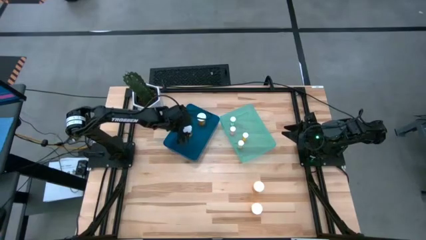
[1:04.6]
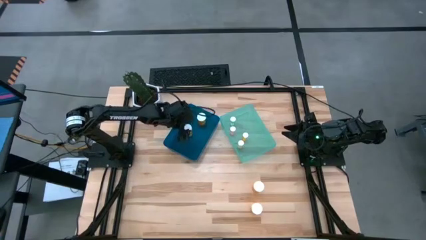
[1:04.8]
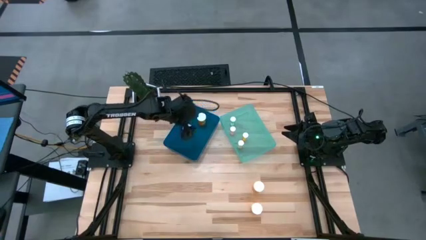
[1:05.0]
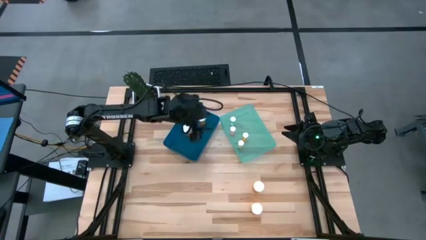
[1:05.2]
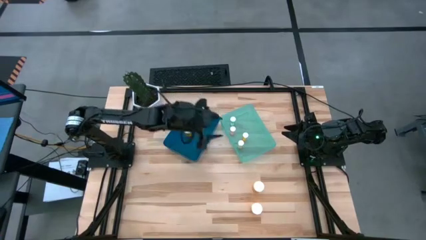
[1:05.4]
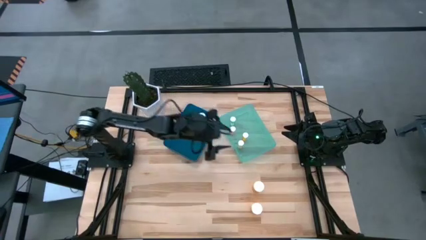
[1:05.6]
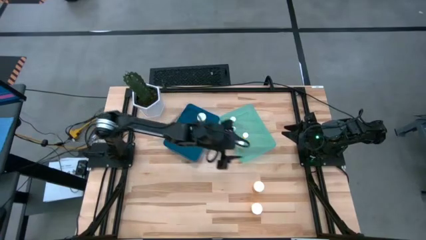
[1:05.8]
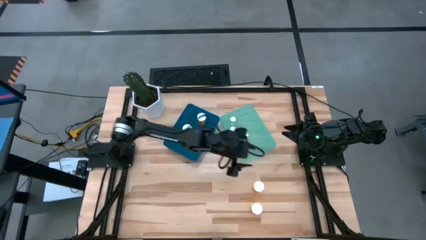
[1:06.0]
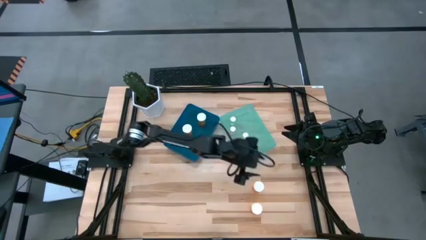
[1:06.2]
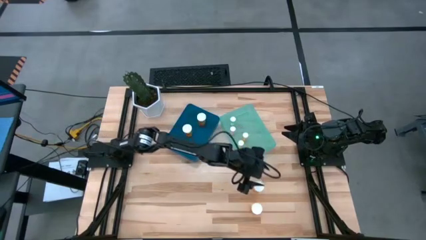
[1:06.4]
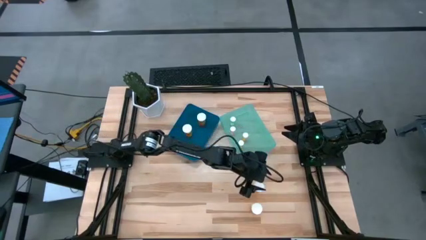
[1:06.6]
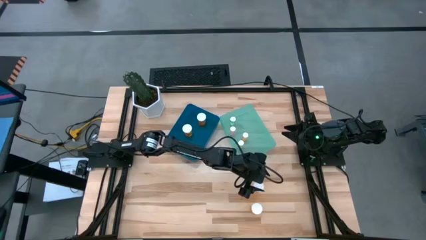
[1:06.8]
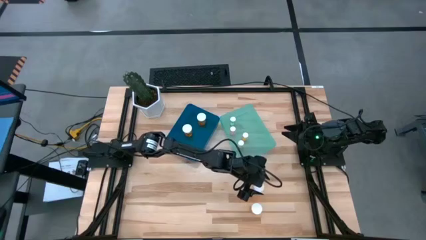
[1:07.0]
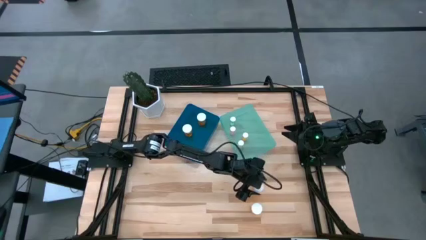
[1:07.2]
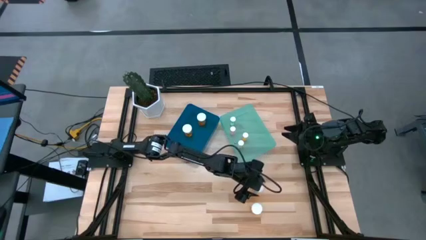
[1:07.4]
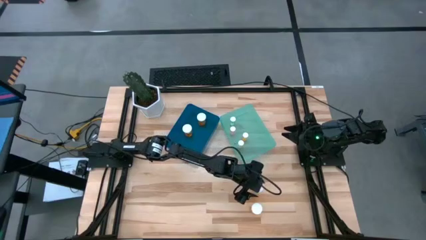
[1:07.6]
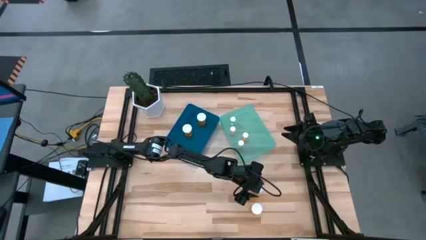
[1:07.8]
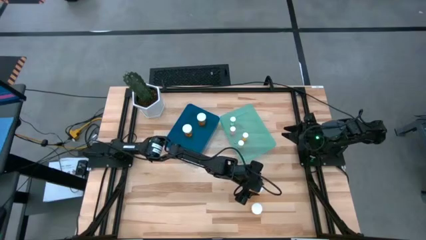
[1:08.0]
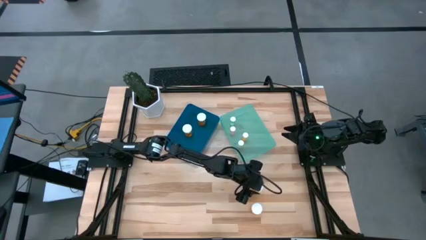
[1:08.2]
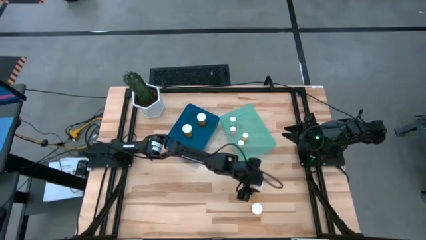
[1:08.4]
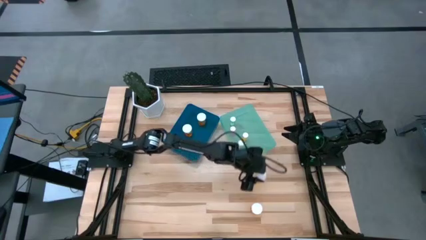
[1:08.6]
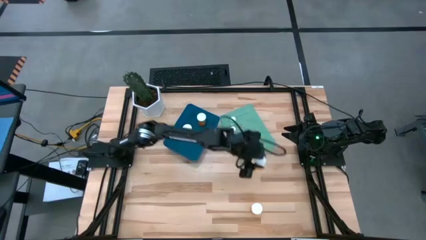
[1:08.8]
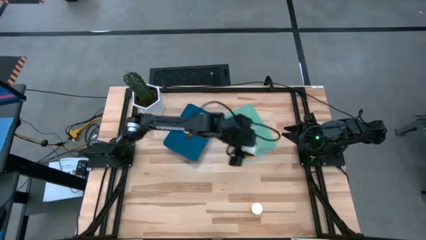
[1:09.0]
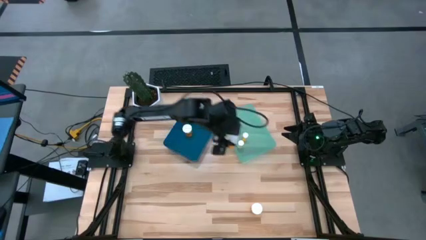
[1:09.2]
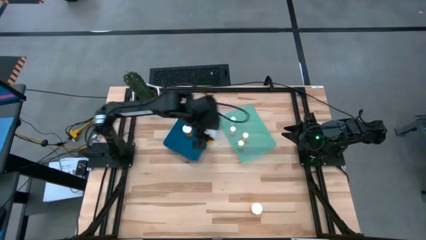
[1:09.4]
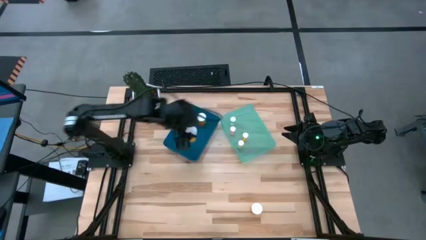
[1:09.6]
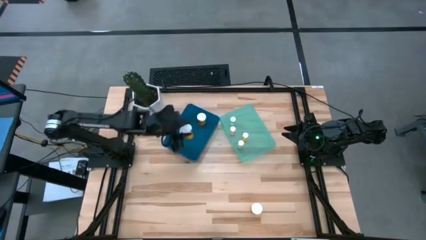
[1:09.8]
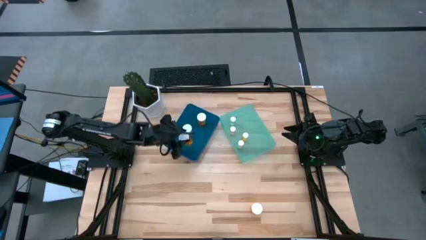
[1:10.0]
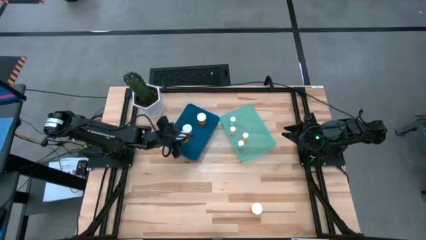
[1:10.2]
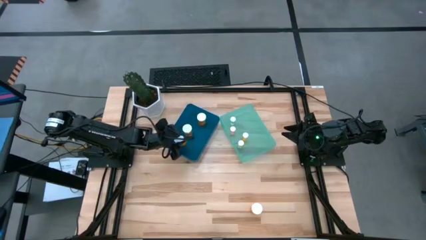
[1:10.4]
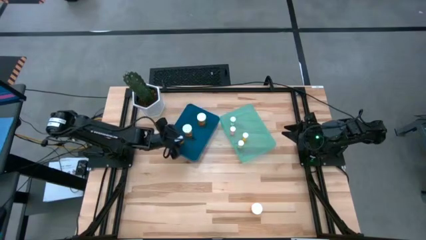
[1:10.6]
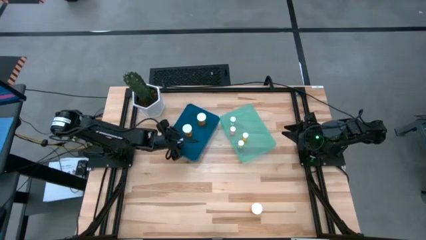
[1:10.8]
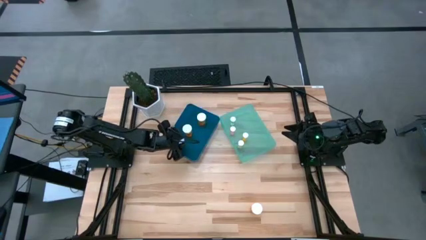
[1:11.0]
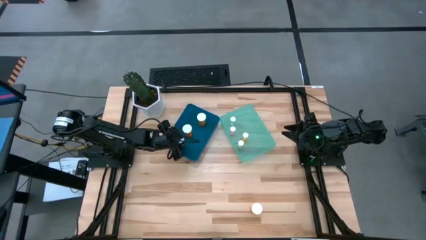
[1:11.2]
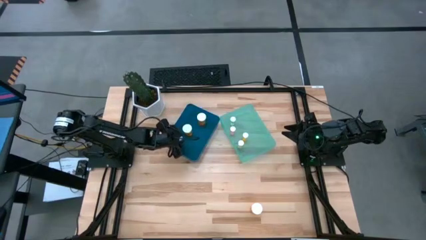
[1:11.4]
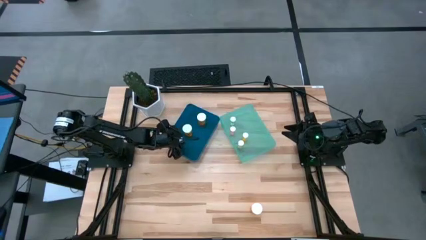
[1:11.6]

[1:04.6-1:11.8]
Task: Pick and place medicine bottles into bin by pill shape (circle, oval)
Put the yellow pill bottle into the blue bin

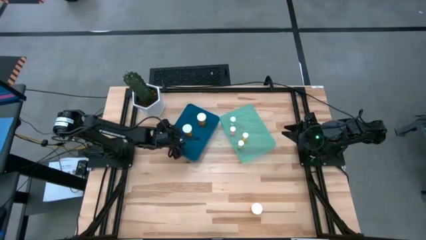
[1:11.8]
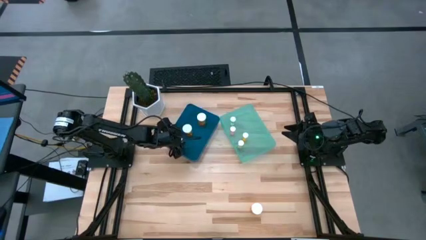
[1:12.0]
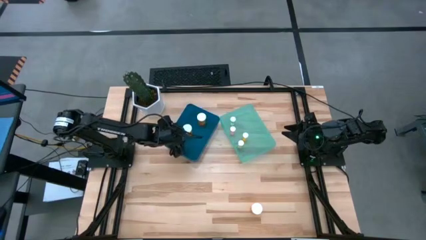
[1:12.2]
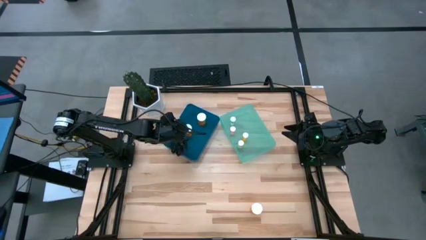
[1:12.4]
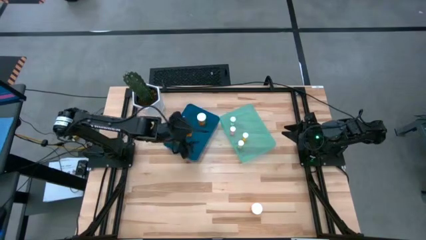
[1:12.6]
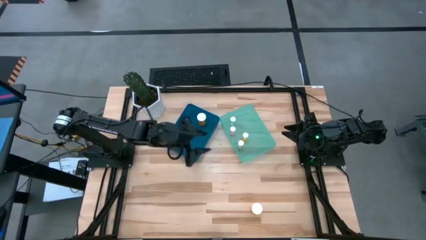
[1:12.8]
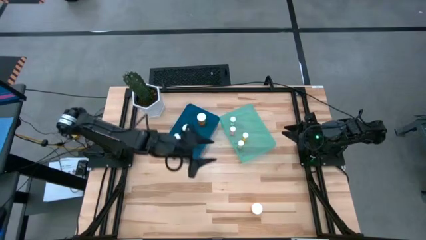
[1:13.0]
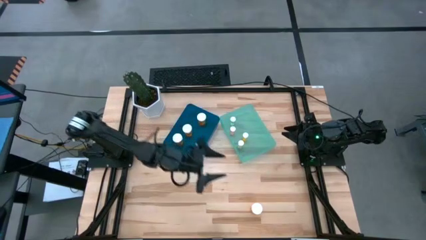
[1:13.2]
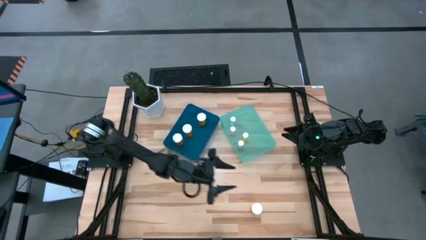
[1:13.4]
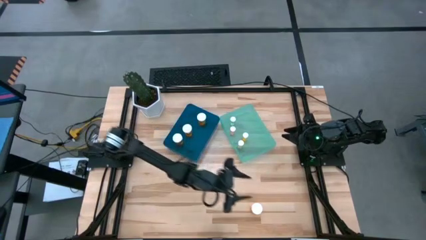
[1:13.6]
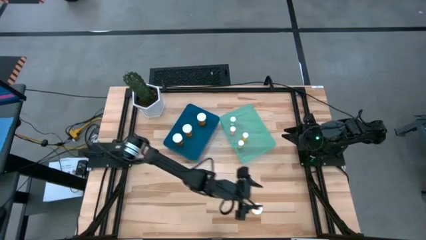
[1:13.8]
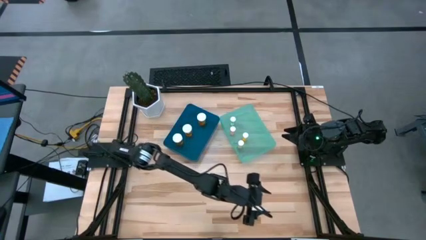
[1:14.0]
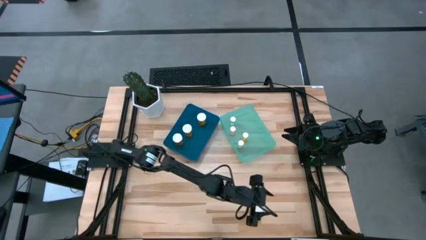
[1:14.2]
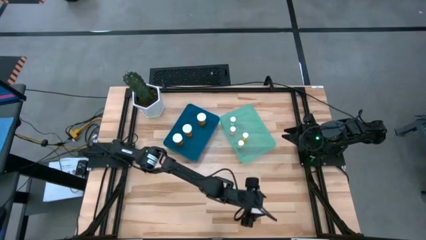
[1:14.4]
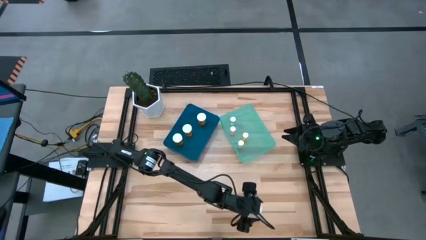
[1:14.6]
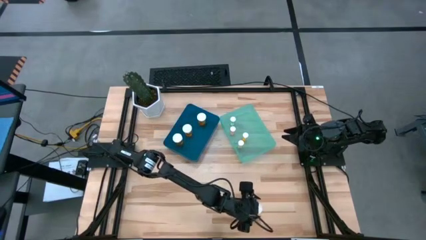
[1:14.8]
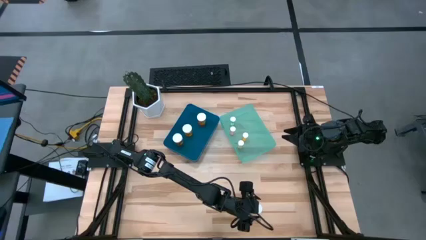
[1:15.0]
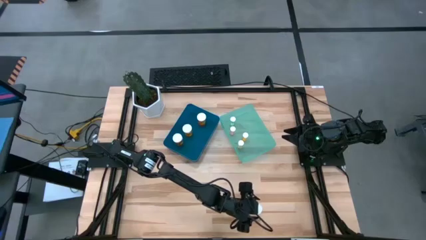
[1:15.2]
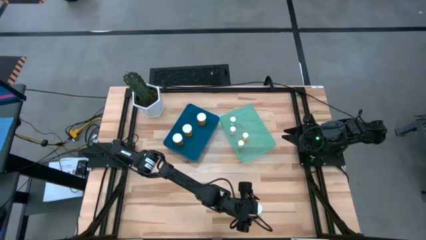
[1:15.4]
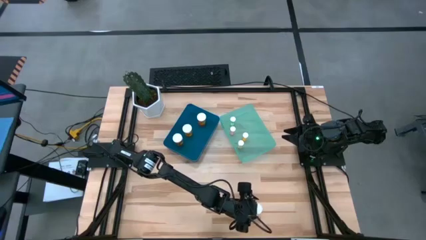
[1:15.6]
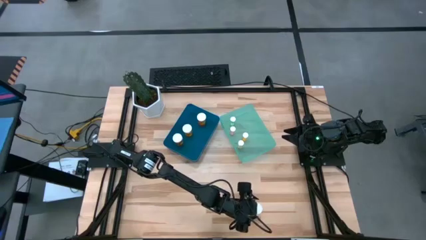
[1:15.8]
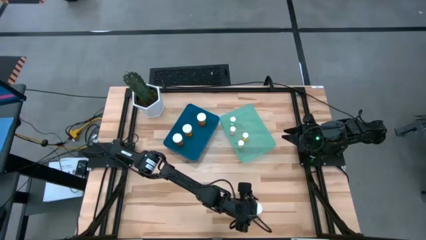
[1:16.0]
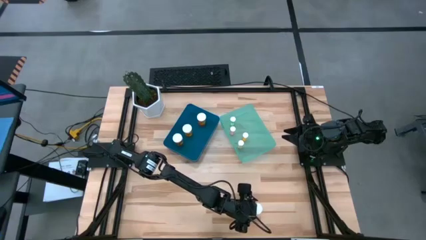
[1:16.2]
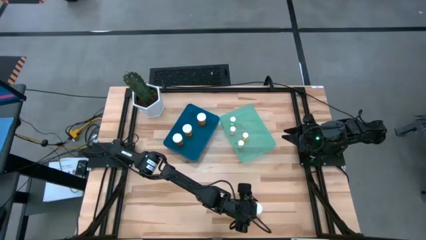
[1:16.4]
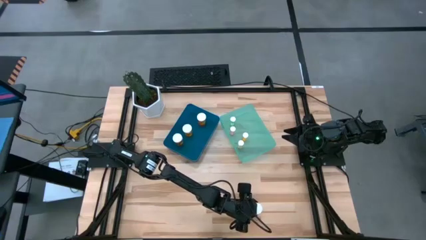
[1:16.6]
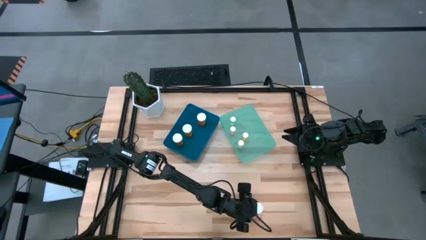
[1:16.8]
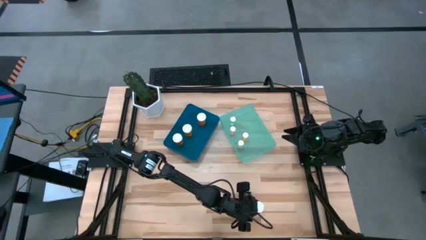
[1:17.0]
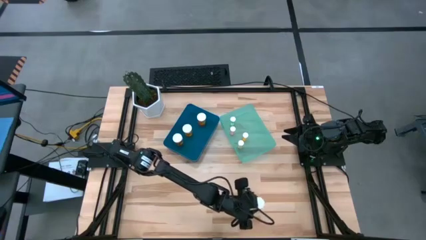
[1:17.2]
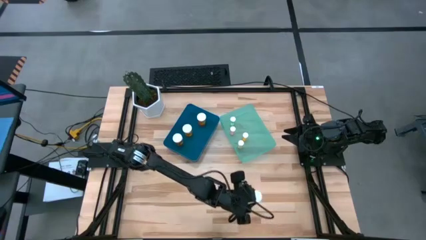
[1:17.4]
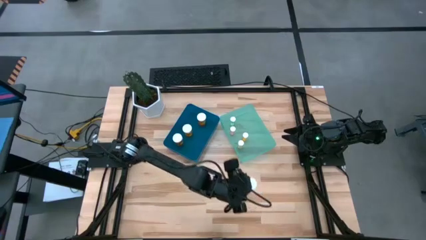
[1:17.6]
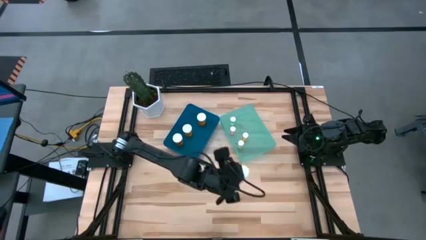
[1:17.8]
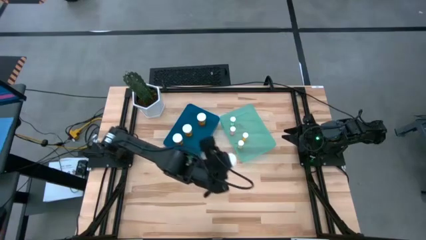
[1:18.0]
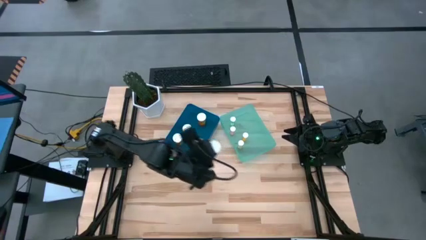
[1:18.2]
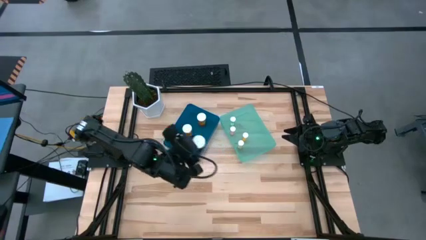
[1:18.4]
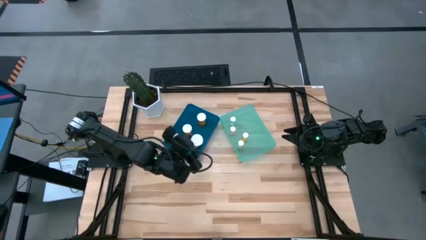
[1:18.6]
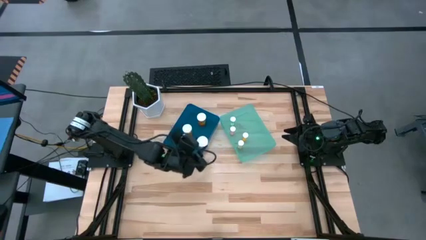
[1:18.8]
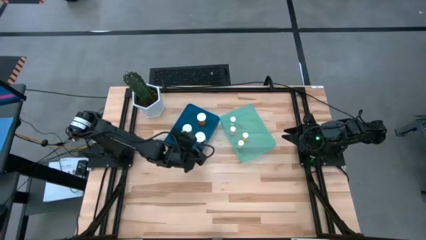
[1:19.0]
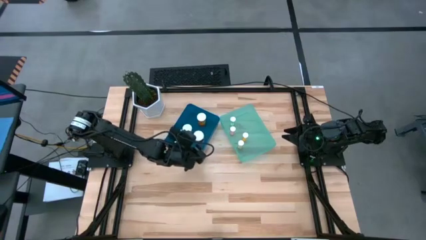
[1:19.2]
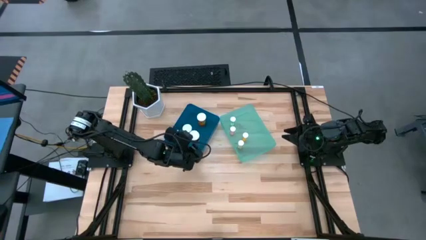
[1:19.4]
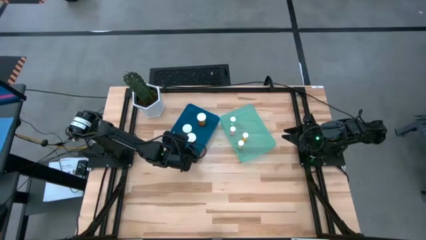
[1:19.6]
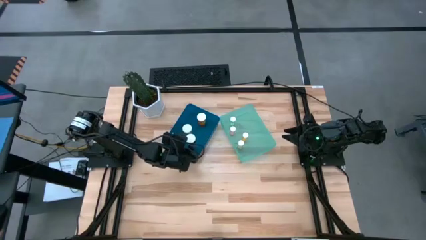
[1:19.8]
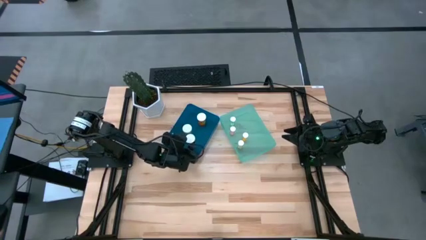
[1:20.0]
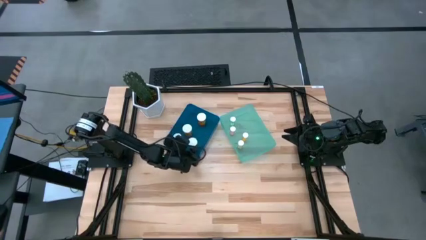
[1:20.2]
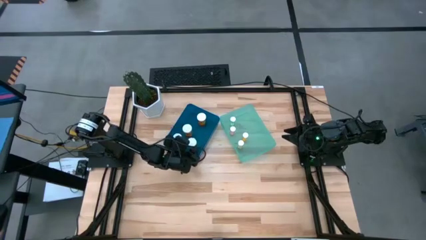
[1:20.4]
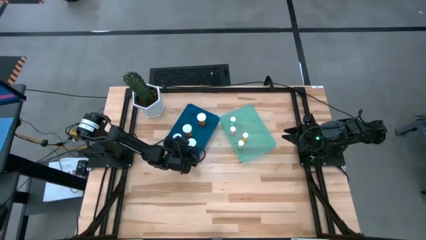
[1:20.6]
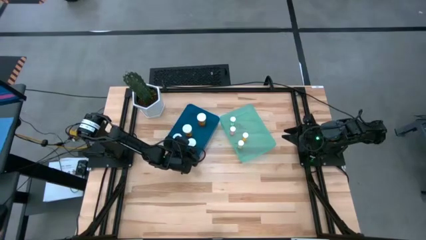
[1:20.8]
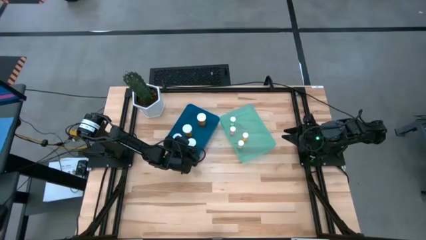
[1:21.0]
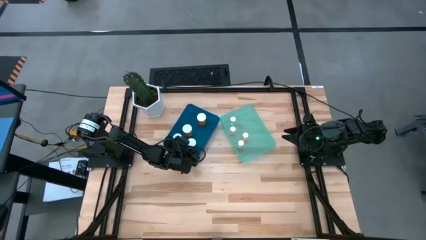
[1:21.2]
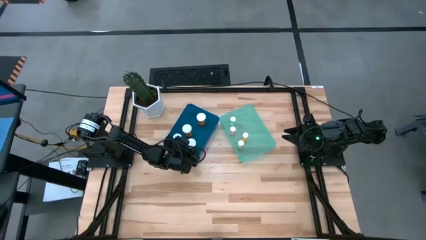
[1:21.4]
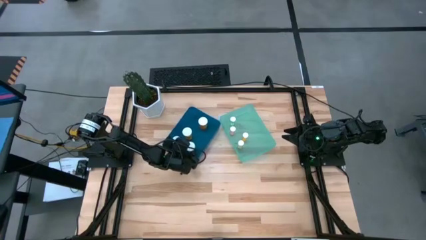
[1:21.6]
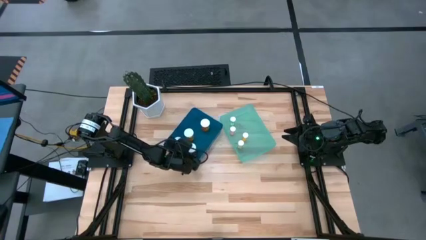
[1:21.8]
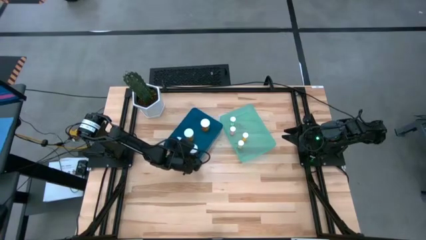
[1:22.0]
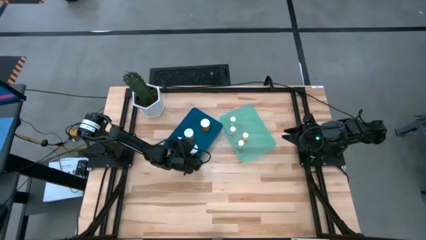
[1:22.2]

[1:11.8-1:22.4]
Put the yellow pill bottle into the blue bin
